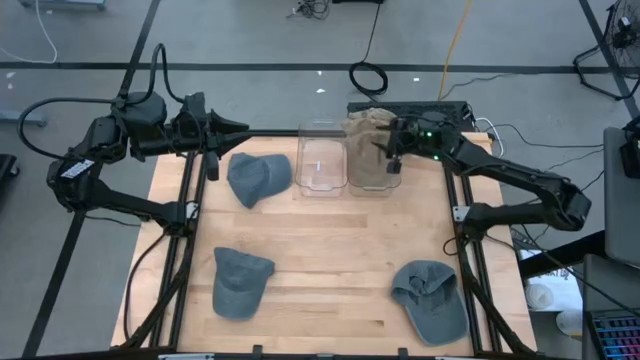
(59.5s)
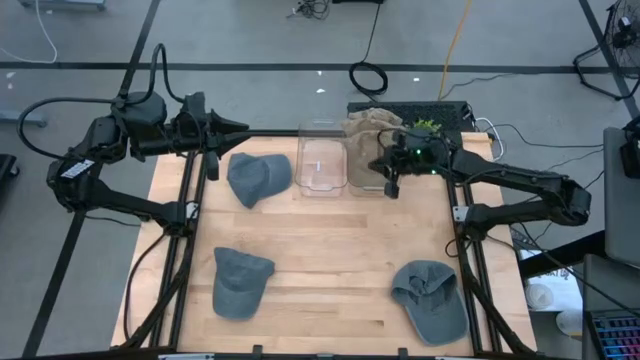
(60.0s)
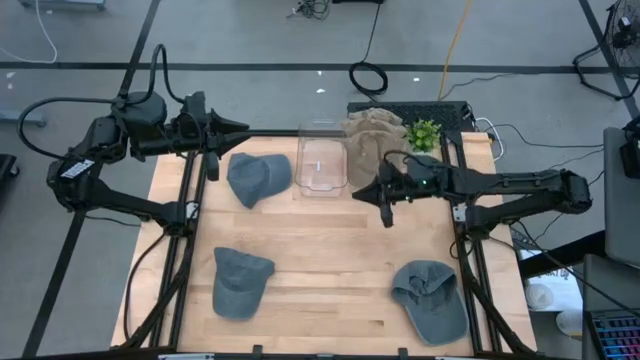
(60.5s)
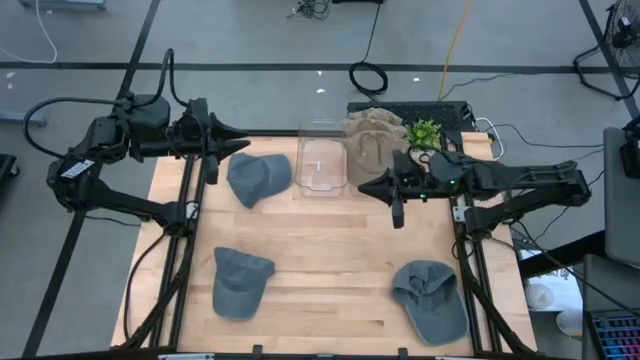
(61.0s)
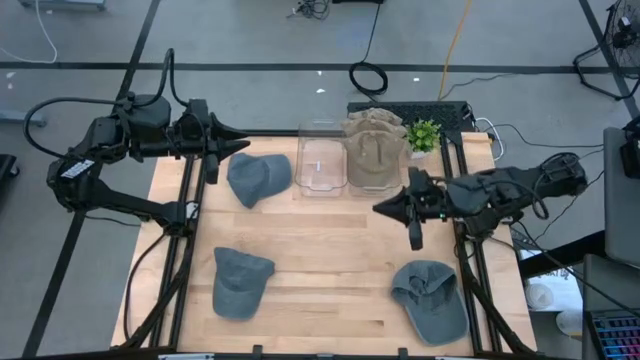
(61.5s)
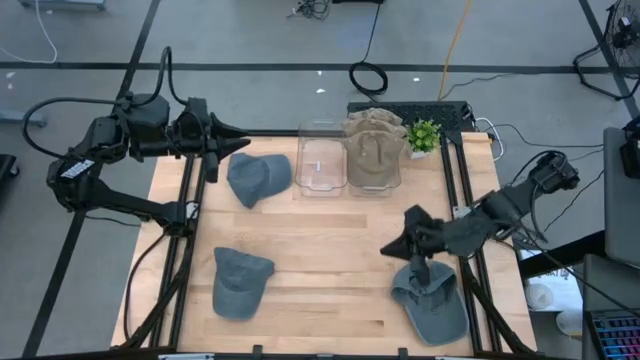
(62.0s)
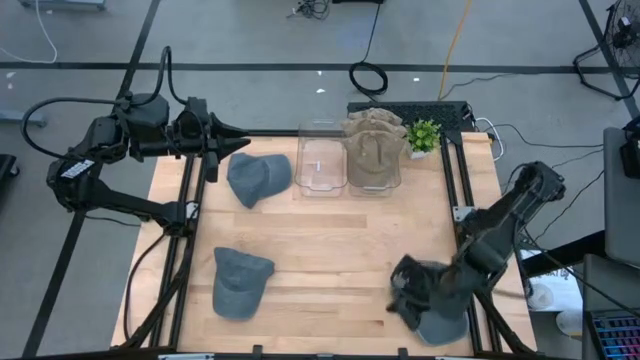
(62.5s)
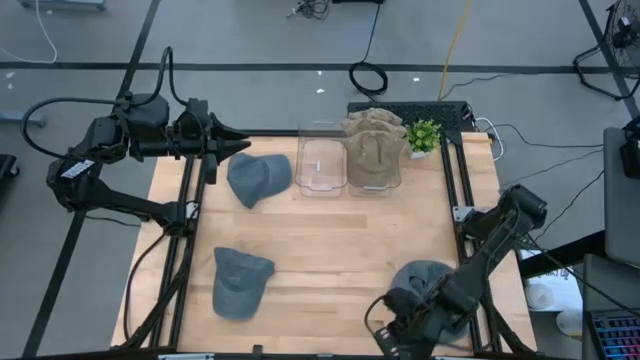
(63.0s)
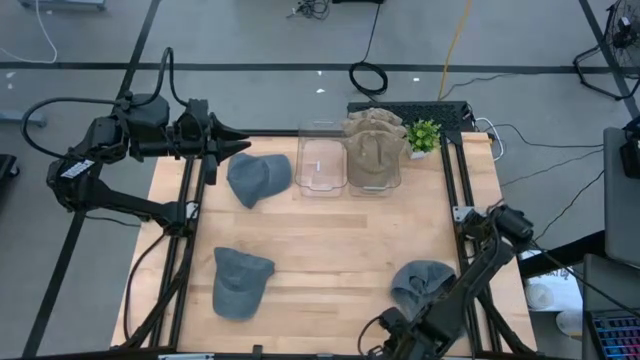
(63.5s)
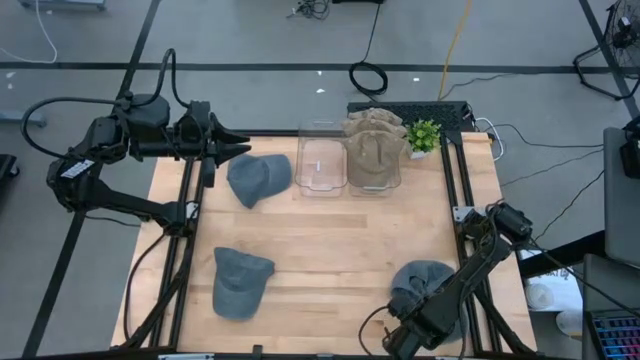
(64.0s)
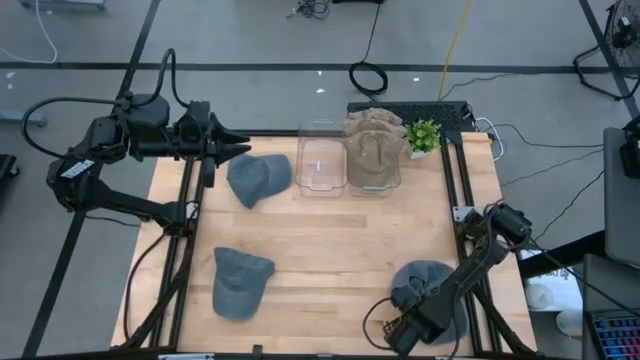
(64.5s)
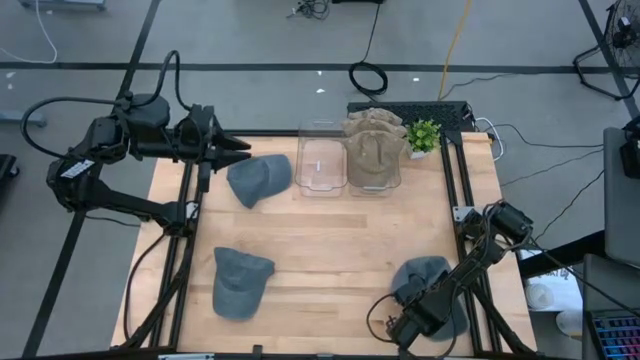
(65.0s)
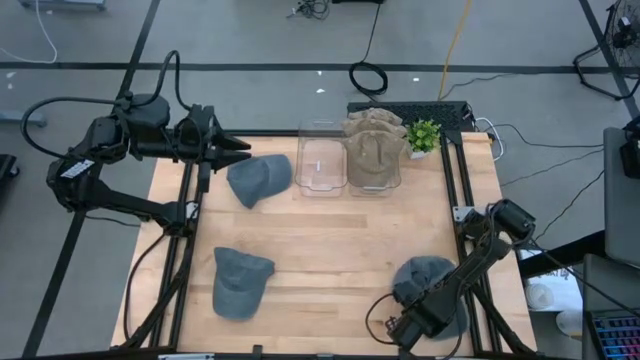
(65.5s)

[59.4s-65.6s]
Task: Pick & Place hat
Put the bottom right blue cap into the left transparent bin

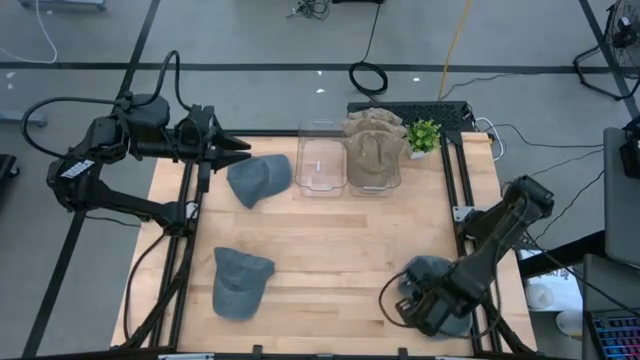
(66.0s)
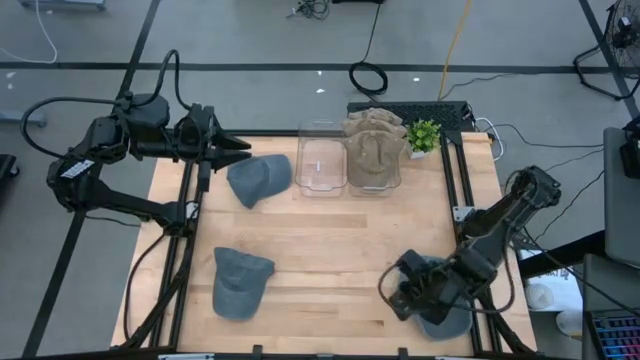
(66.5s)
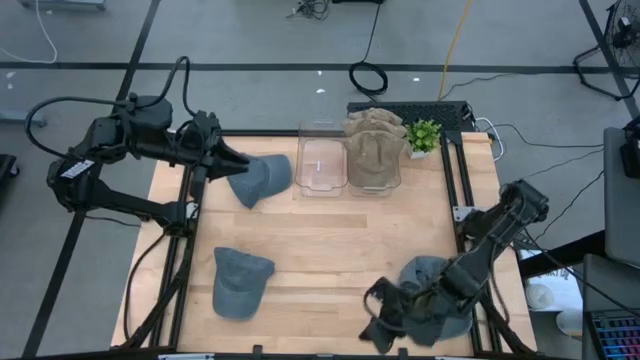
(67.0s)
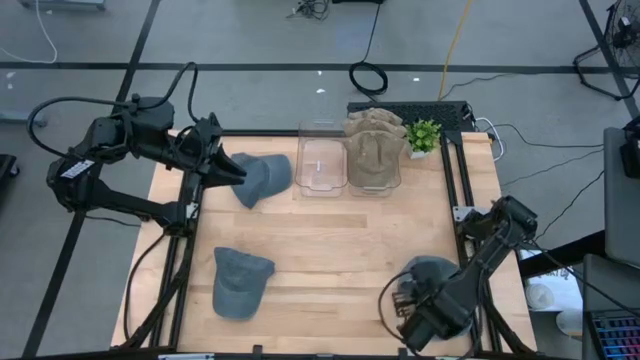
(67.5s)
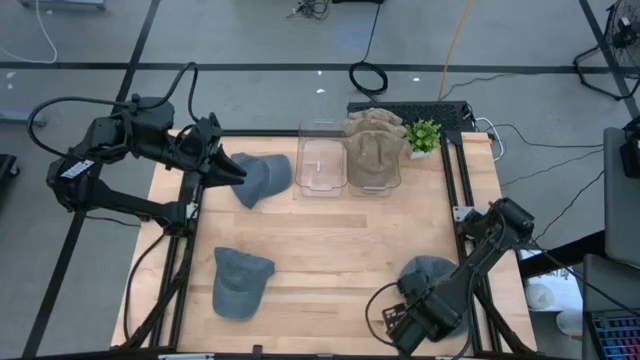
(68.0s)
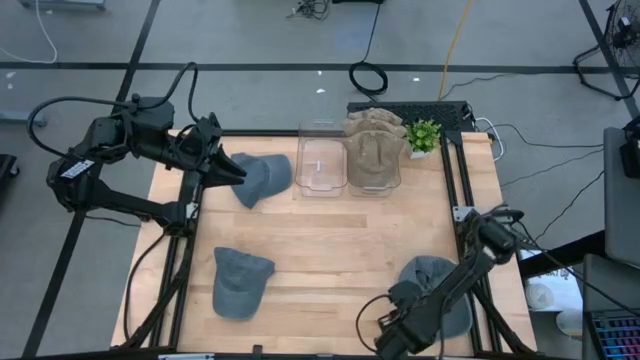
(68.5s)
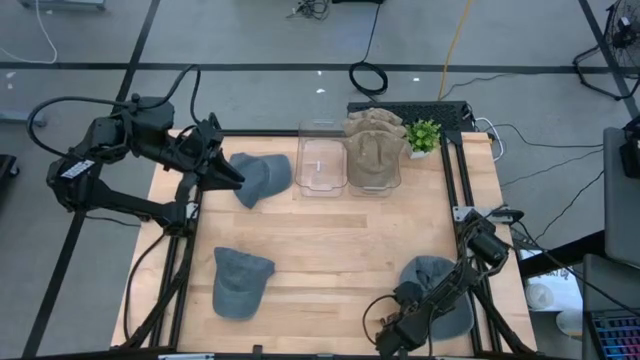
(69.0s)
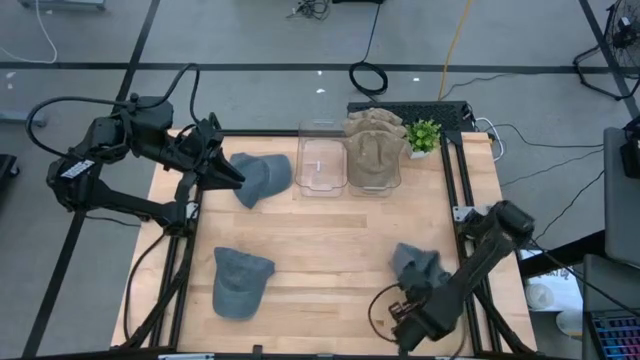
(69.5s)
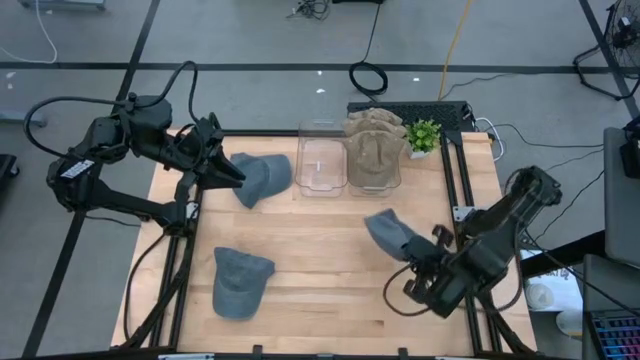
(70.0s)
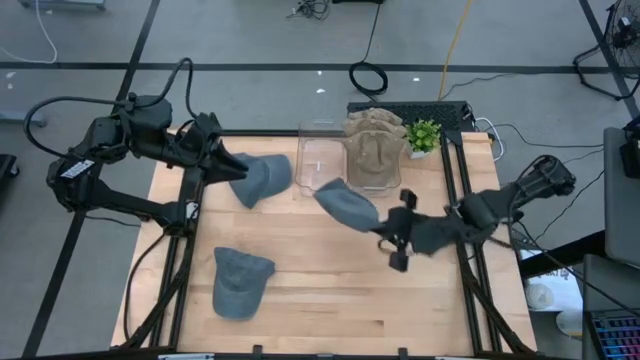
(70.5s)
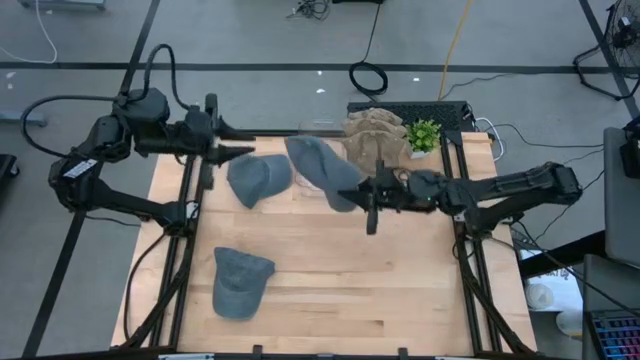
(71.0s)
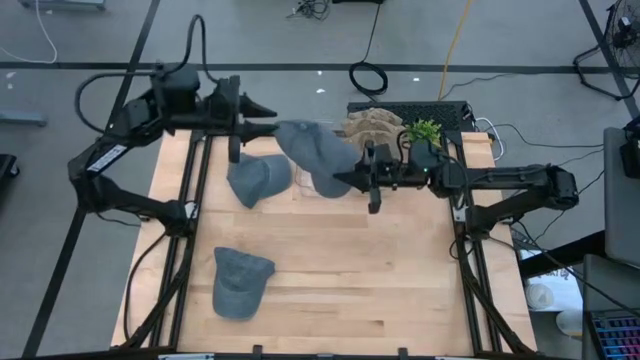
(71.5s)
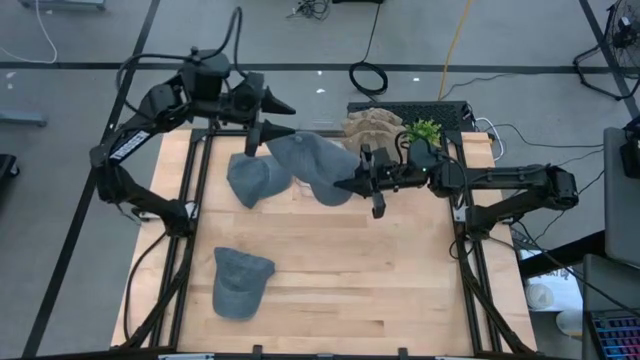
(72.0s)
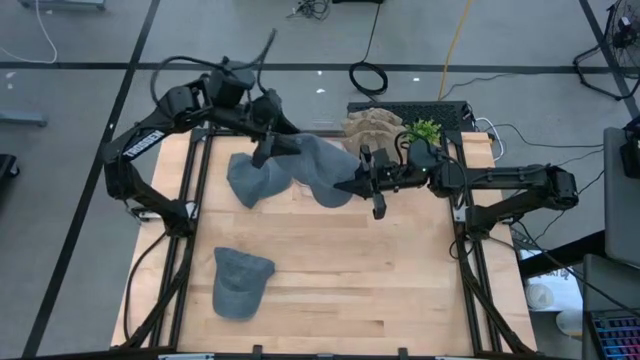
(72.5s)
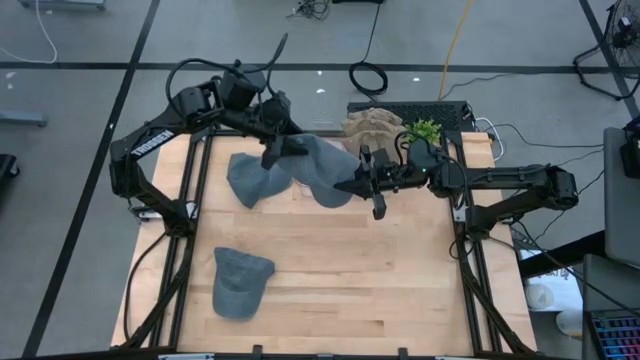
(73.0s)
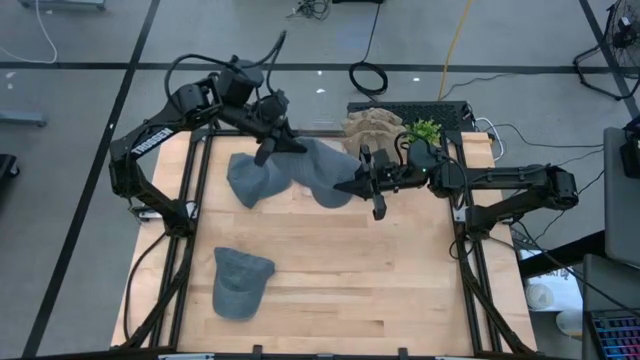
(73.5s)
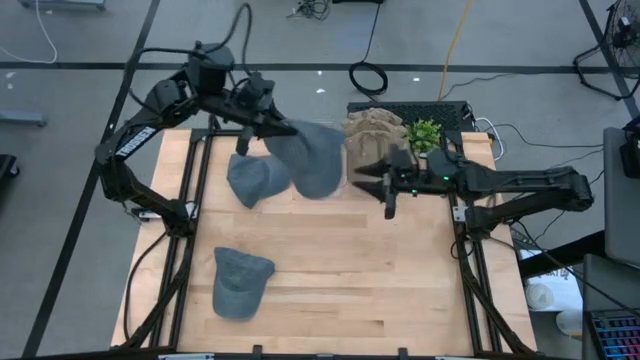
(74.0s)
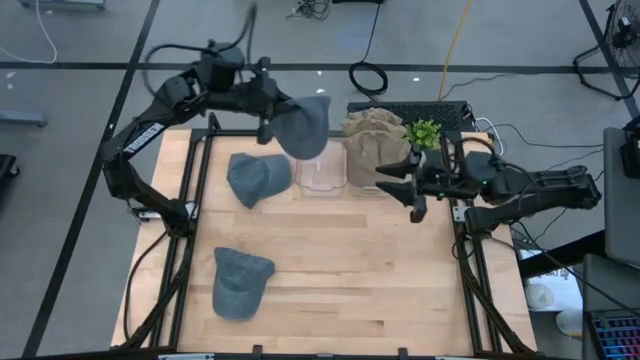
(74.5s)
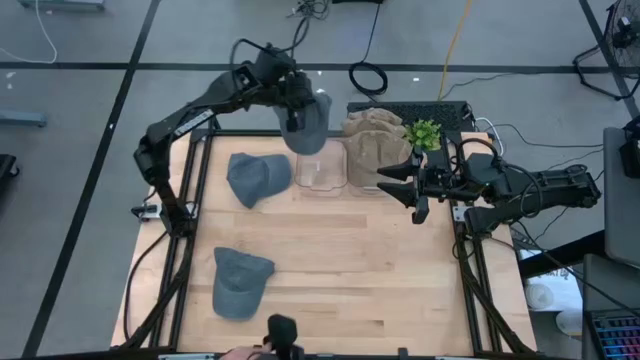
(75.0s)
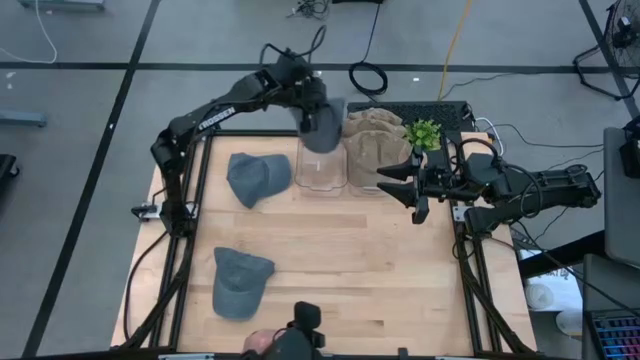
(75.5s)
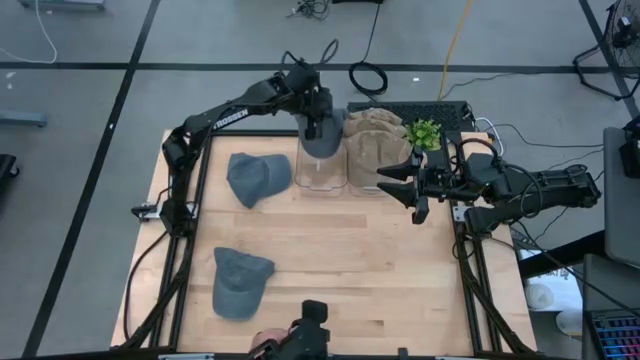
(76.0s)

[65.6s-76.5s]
Put the bottom right blue cap into the left transparent bin
